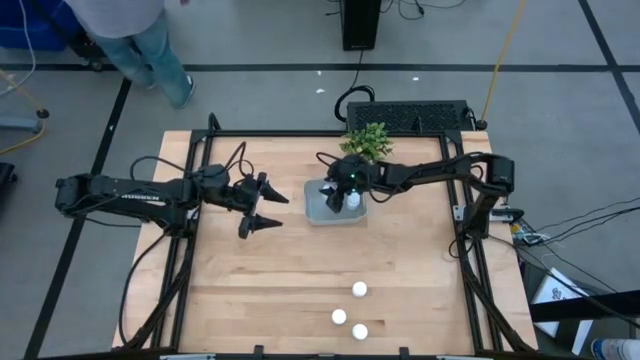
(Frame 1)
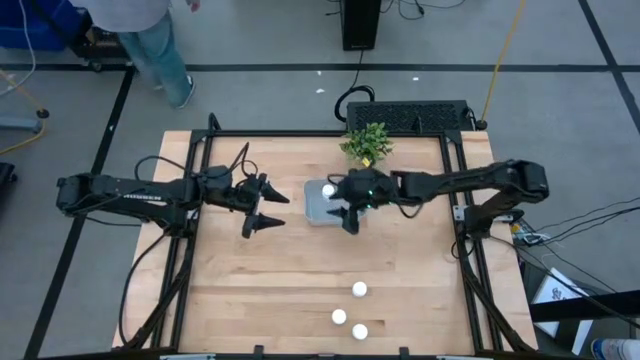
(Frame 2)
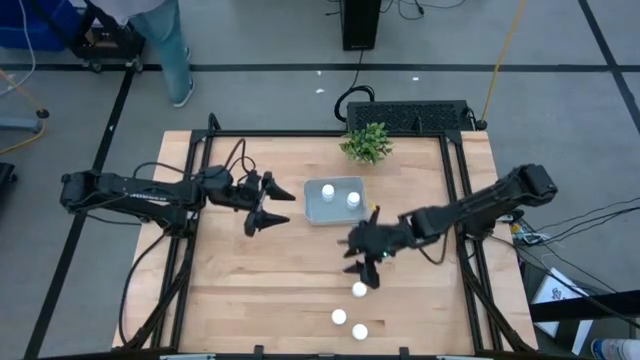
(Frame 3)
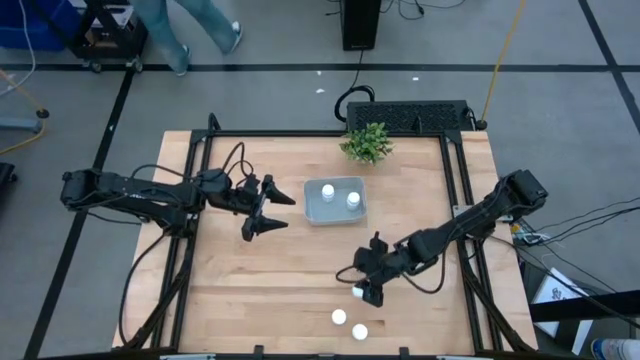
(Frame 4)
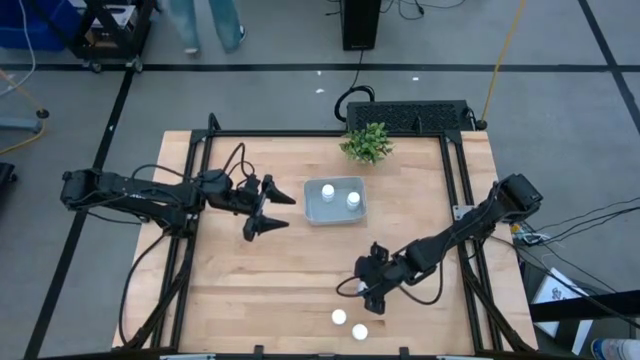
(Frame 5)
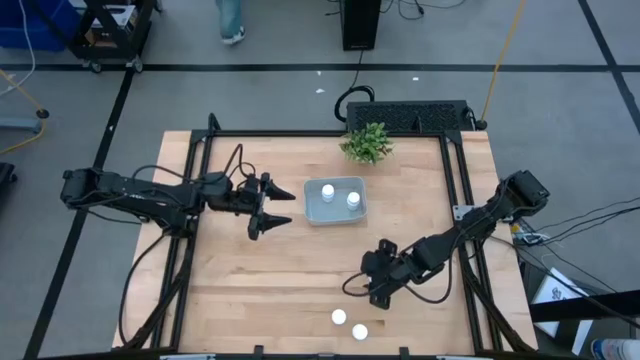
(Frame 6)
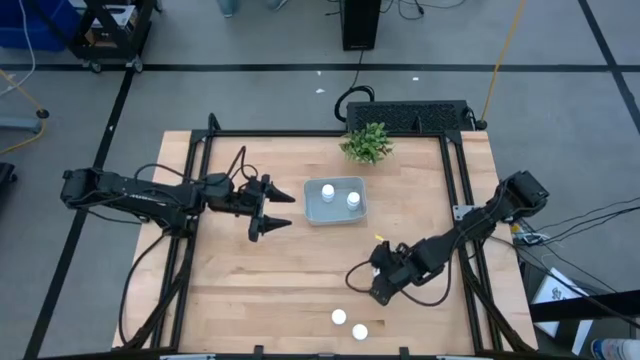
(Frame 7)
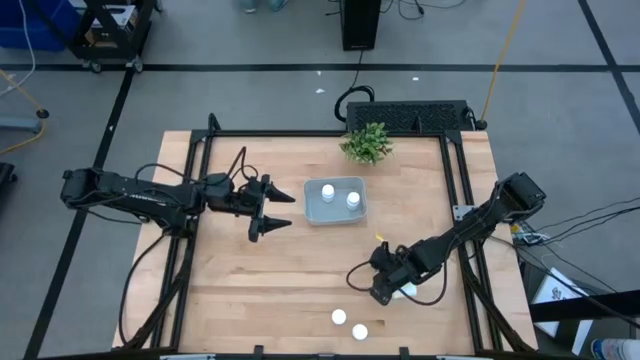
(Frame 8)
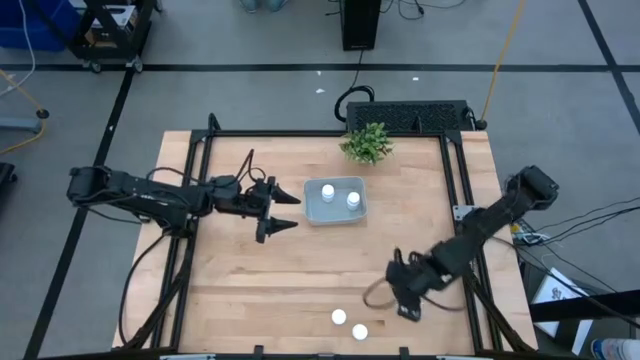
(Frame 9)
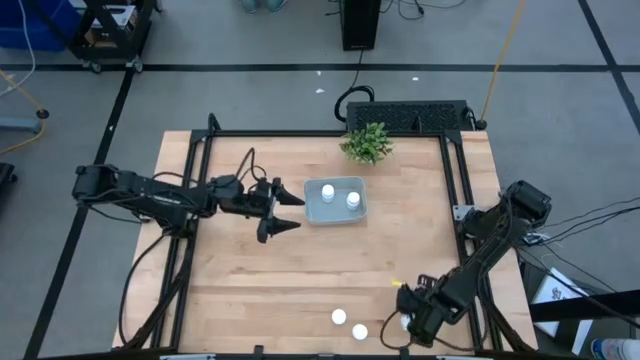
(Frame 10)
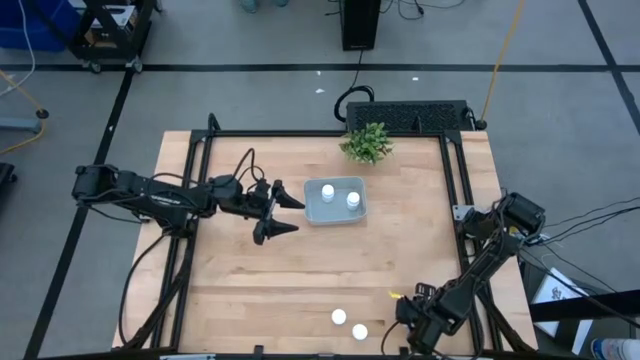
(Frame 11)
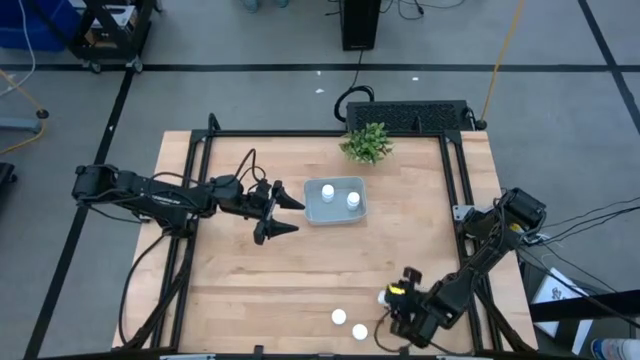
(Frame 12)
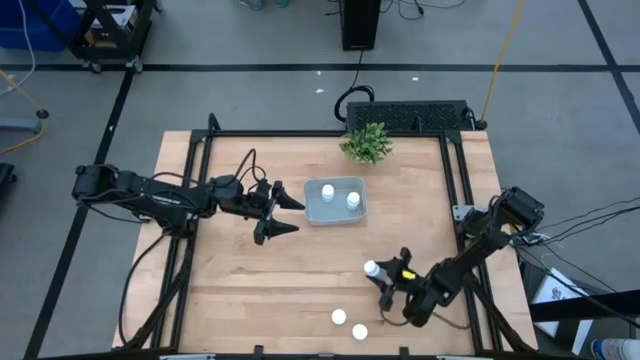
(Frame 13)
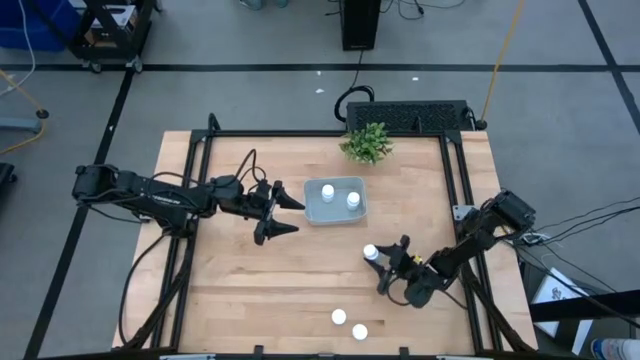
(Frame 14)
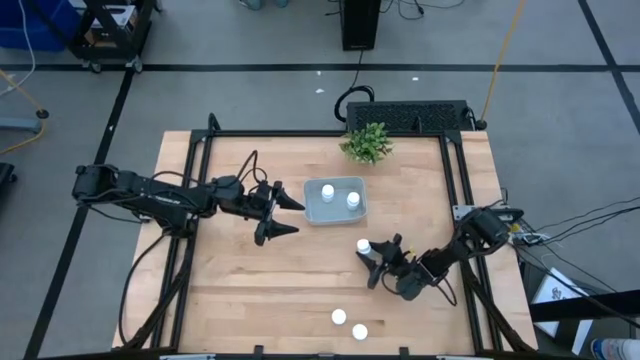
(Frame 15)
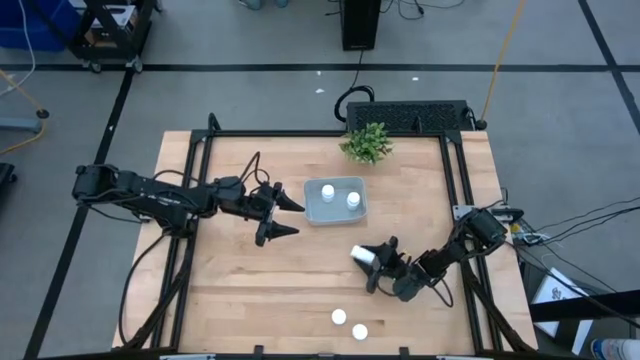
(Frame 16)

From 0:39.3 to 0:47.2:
Task: Pick and place pill bottles into a basket
Put the white pill bottle into the gray bin

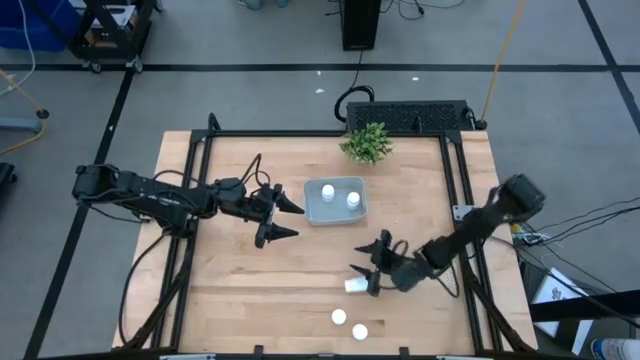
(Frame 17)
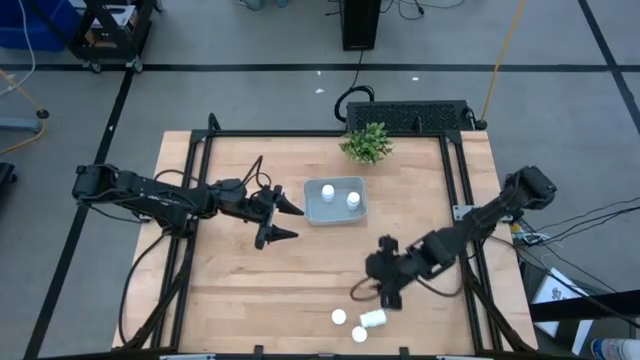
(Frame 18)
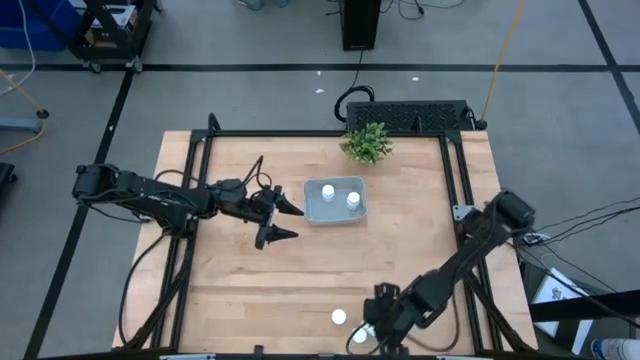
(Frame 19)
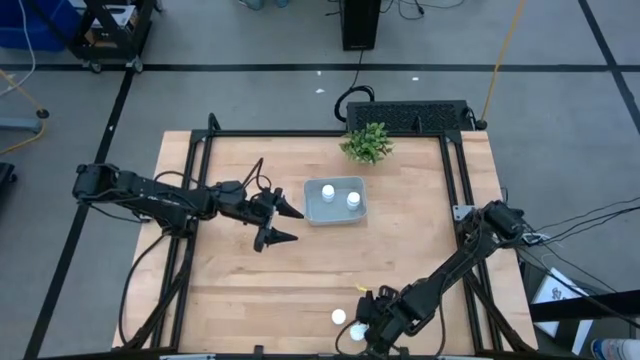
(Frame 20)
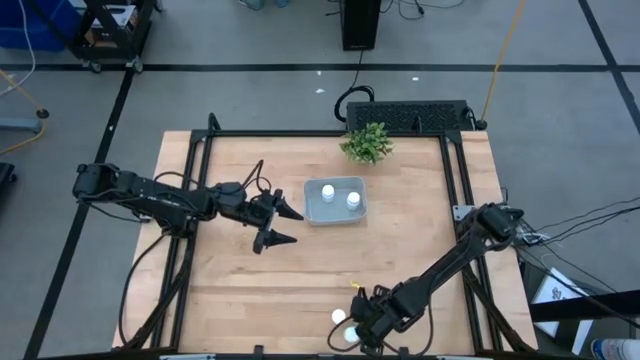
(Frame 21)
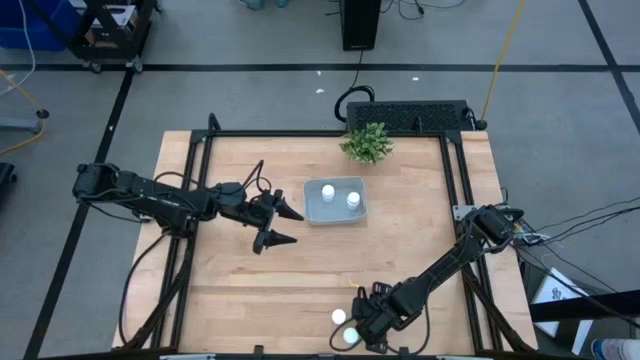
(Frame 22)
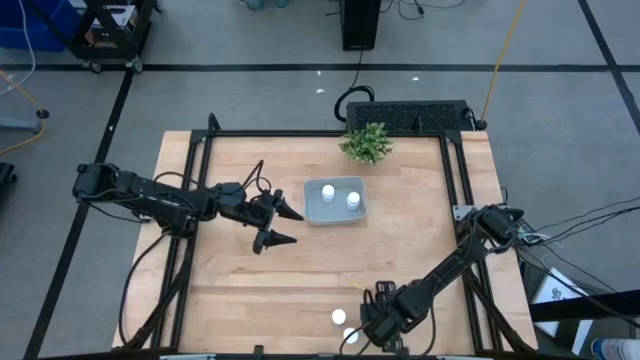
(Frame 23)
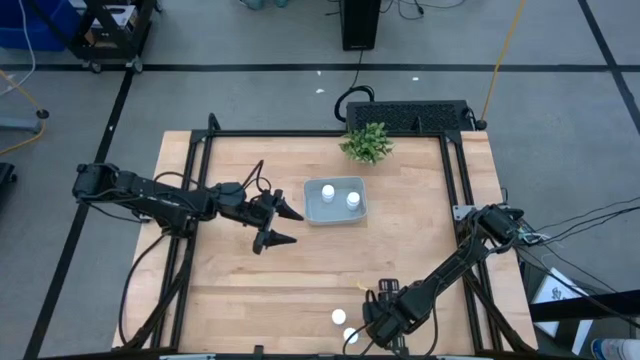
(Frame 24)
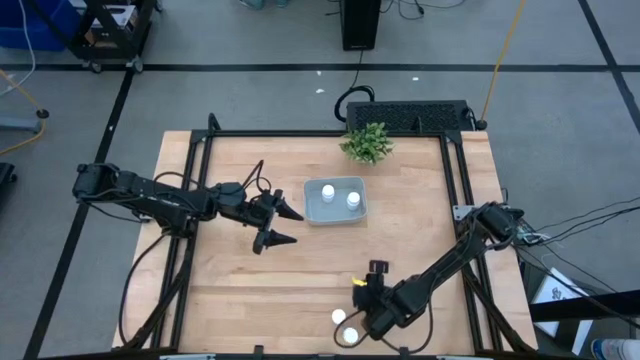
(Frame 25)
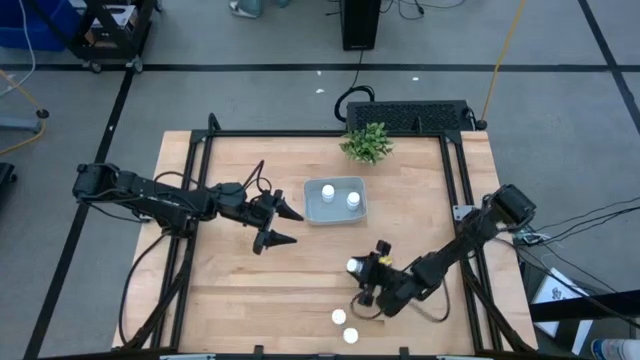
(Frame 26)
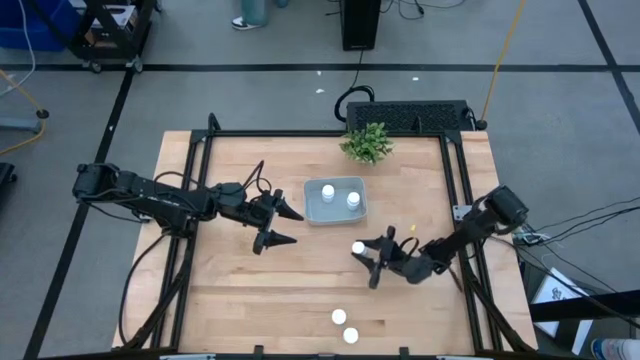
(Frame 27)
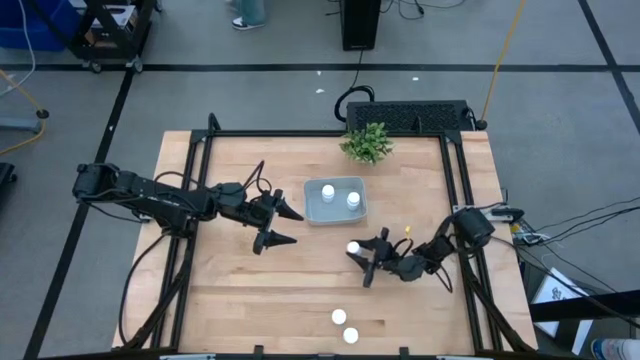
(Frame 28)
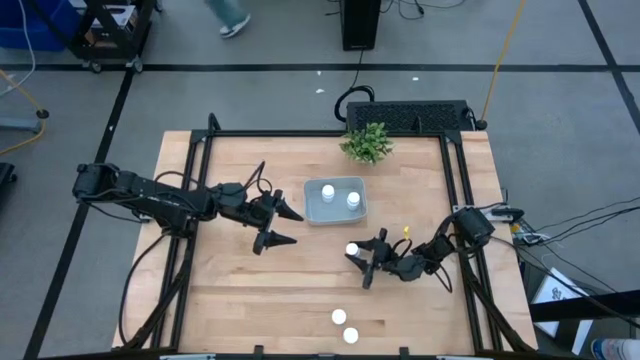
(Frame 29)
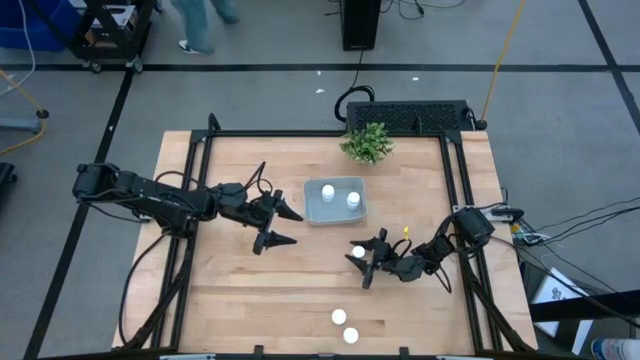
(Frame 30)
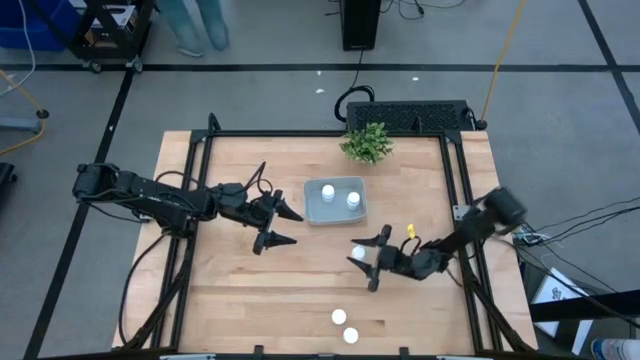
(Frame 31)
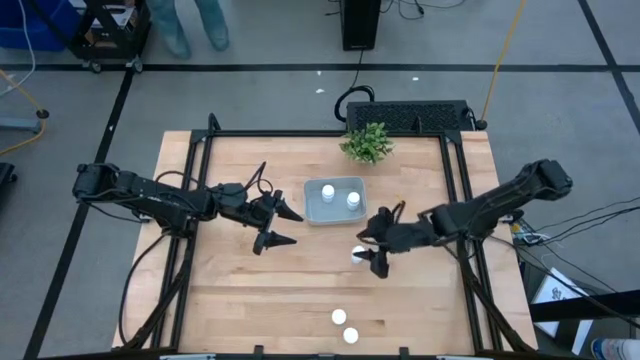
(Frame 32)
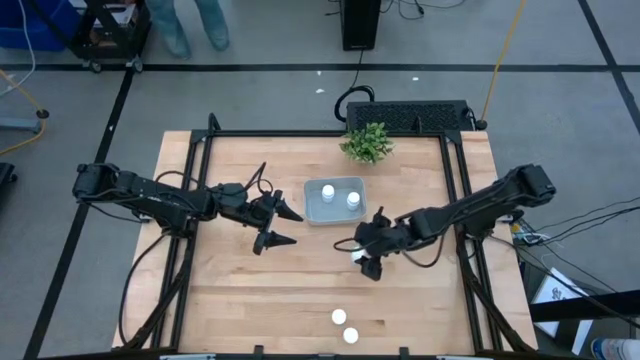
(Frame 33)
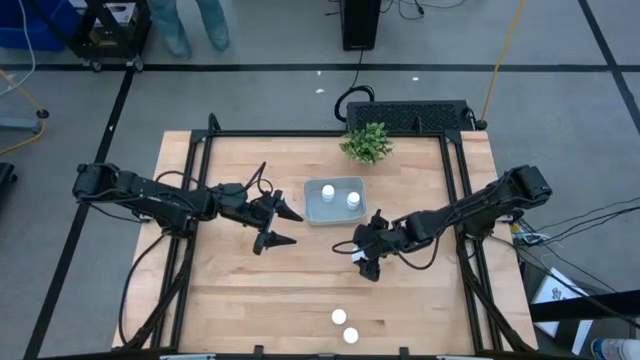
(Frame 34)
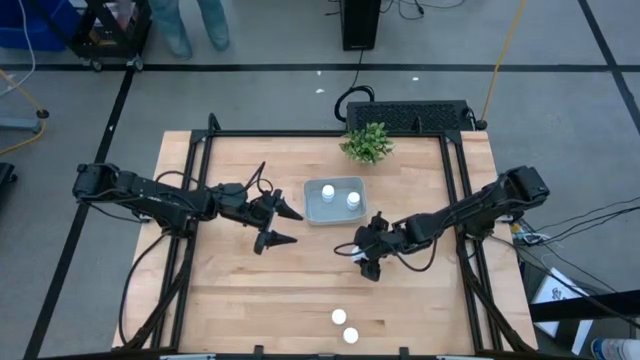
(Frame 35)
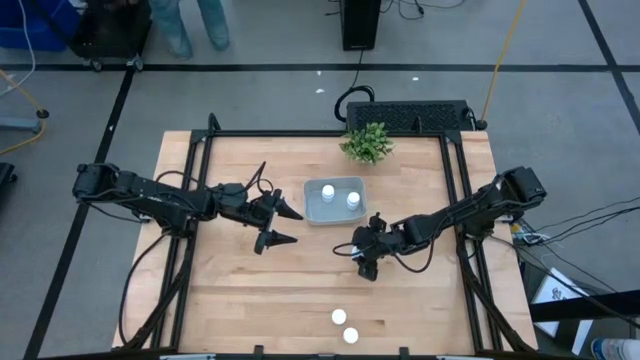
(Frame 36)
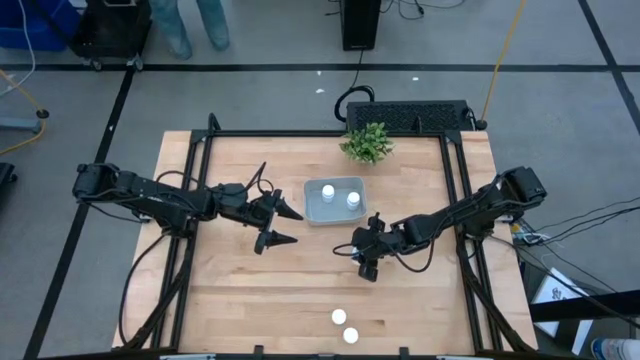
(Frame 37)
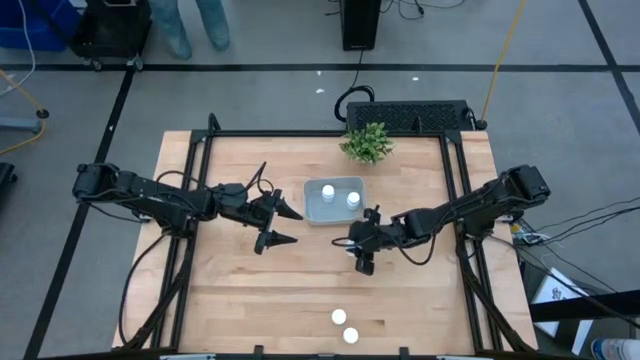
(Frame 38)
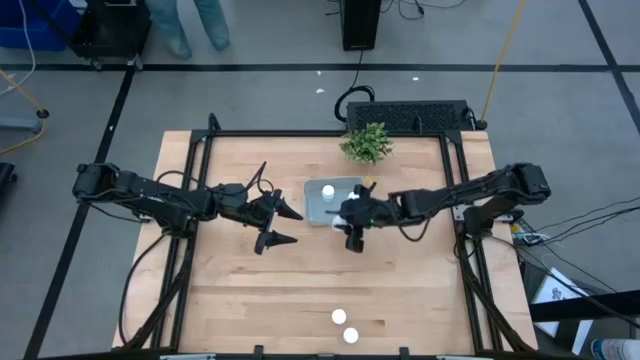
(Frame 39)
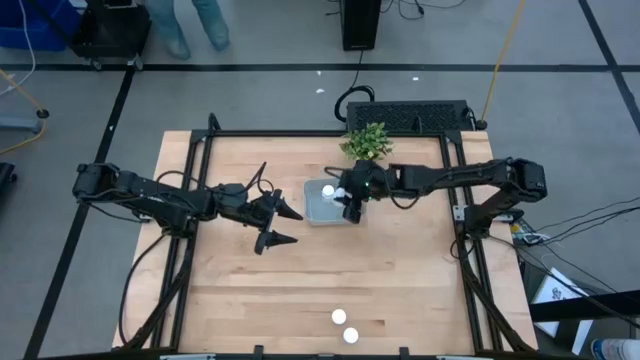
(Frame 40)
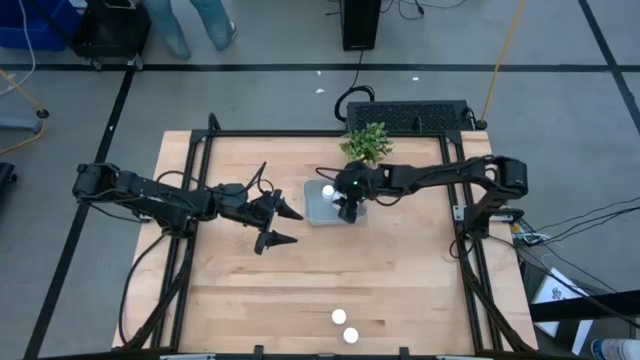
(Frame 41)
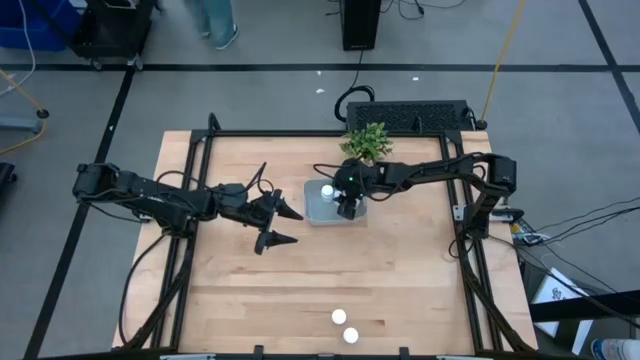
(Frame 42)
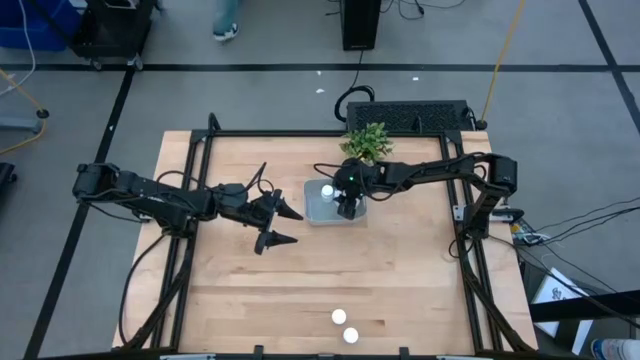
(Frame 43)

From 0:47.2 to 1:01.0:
Put the white pill bottle into the gray bin
